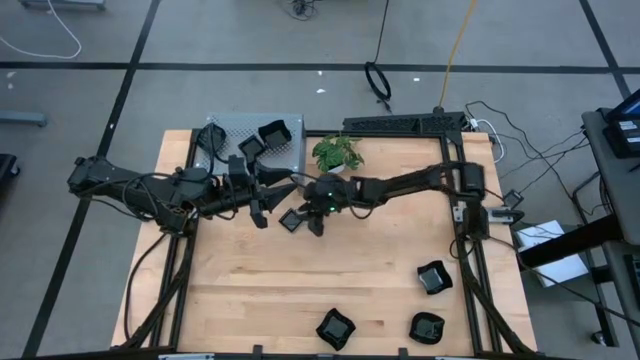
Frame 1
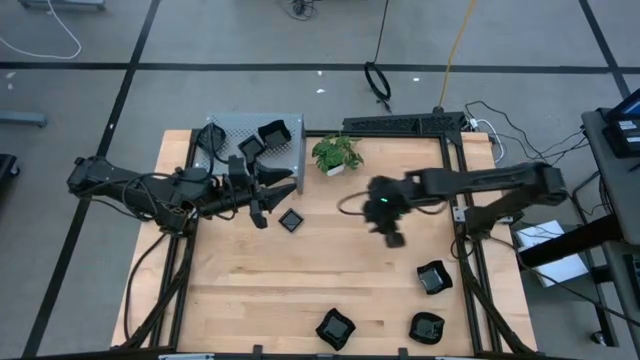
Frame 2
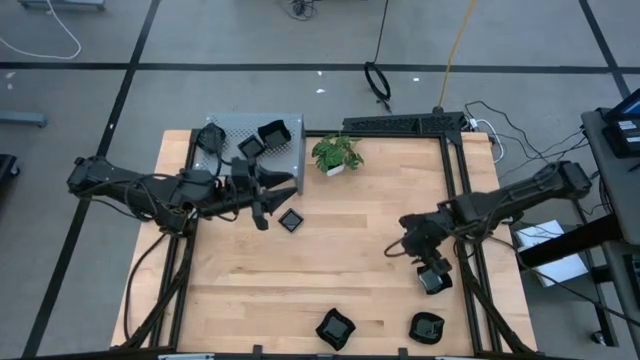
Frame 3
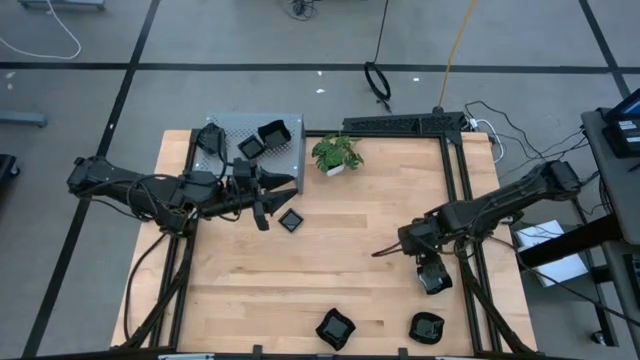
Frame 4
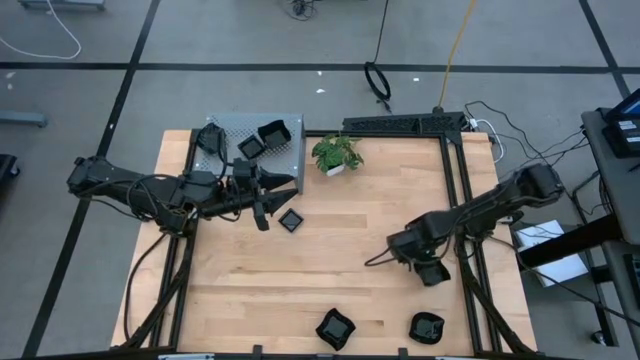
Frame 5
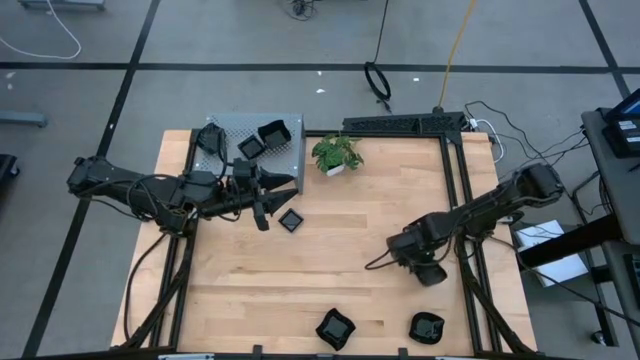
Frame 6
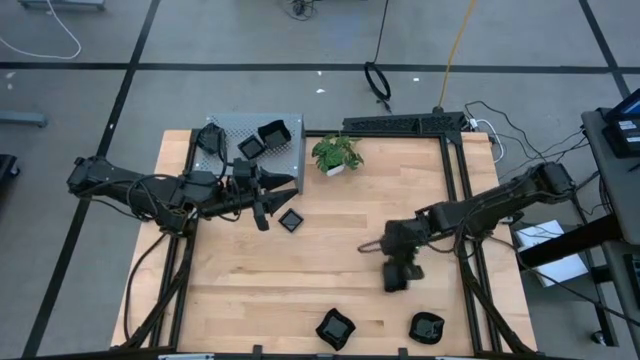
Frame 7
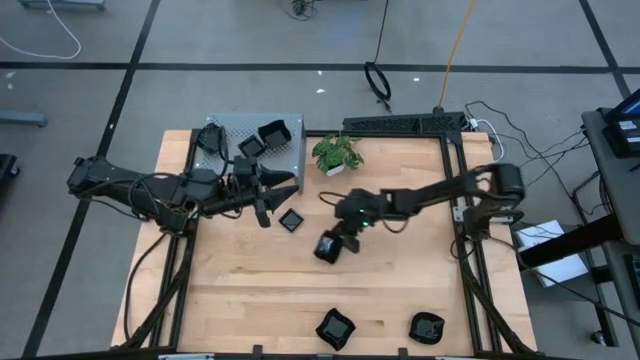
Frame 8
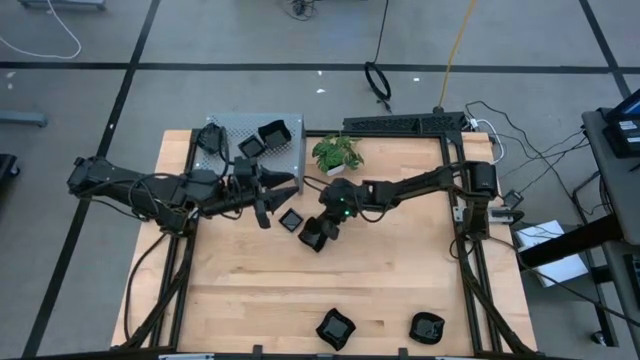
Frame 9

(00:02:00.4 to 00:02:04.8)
Task: Pick & Place Mini shaped plates
Move the black distorted square plate to the center of the table

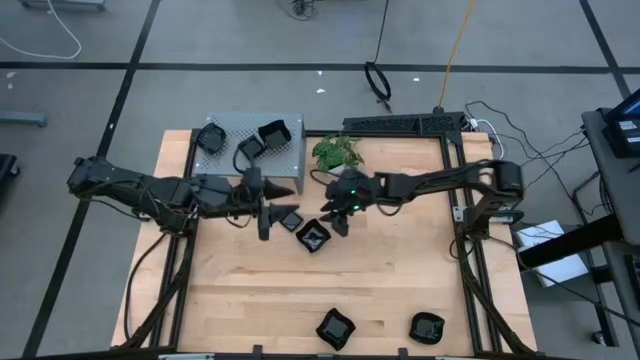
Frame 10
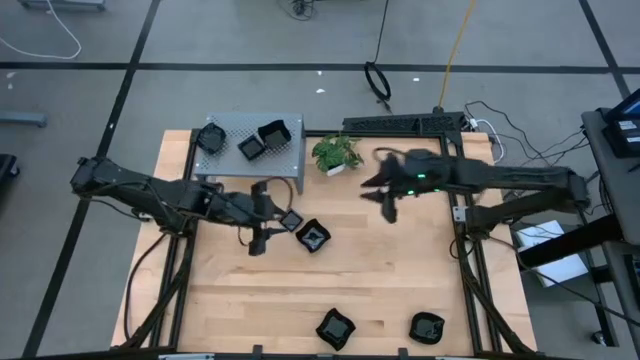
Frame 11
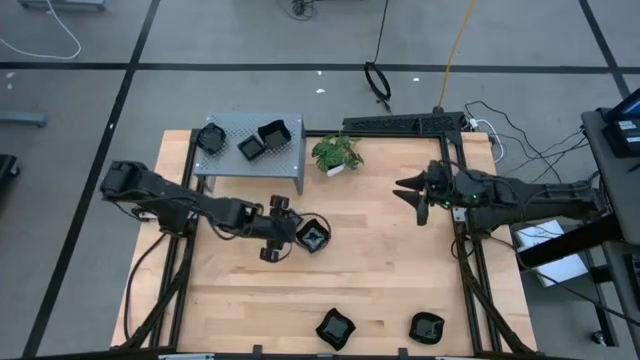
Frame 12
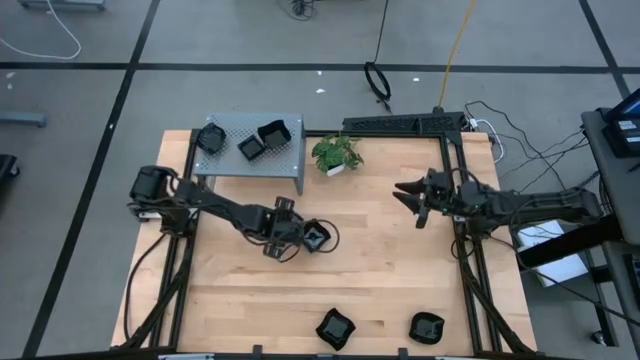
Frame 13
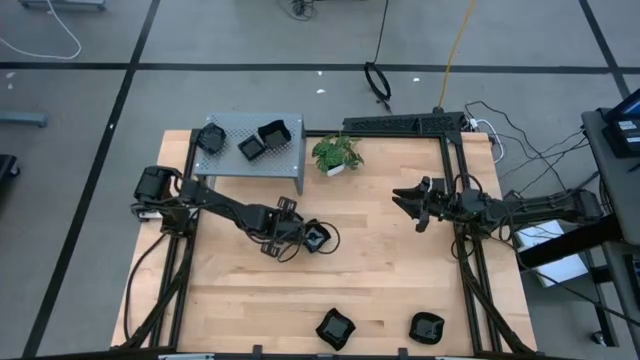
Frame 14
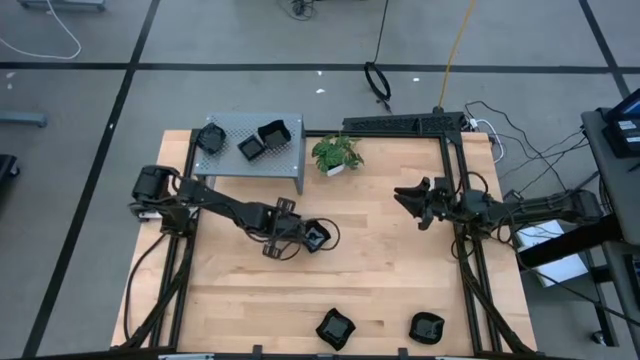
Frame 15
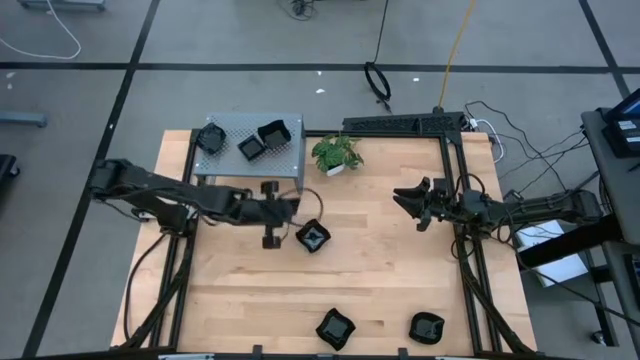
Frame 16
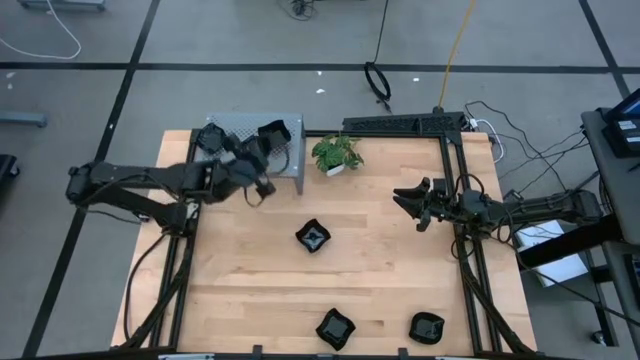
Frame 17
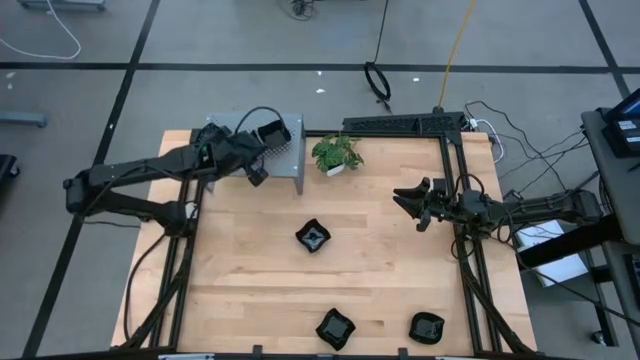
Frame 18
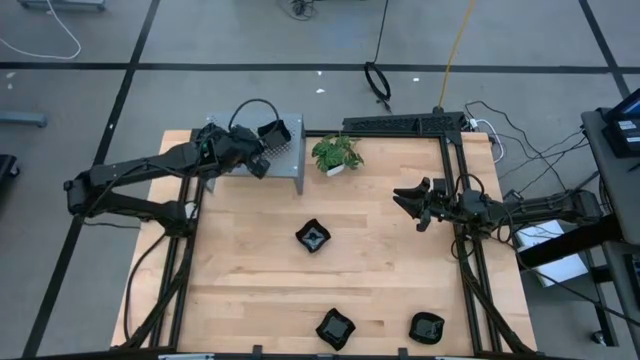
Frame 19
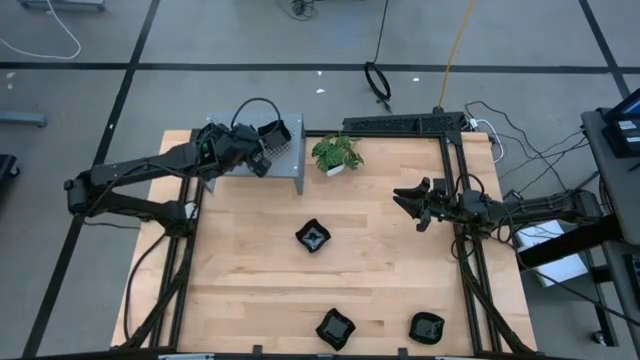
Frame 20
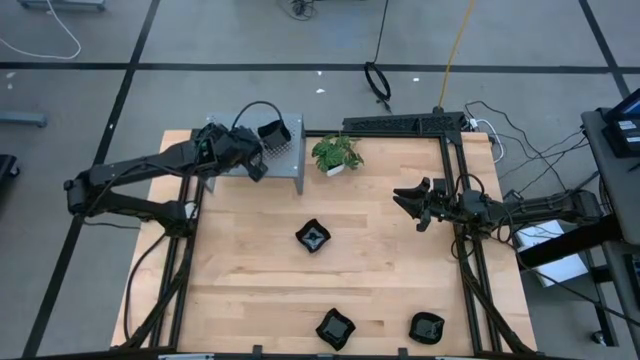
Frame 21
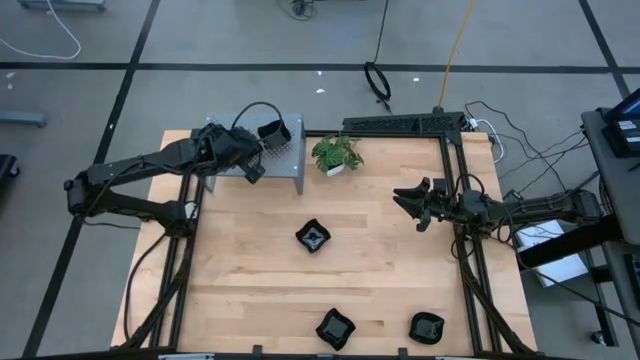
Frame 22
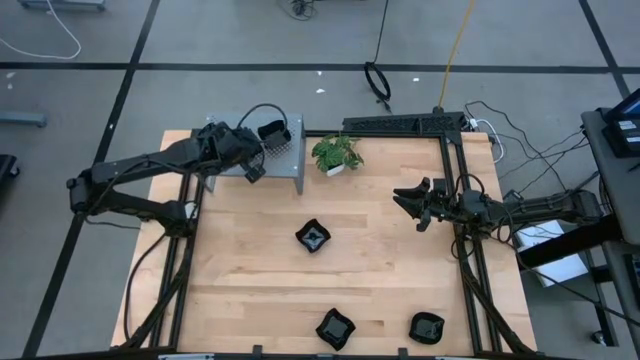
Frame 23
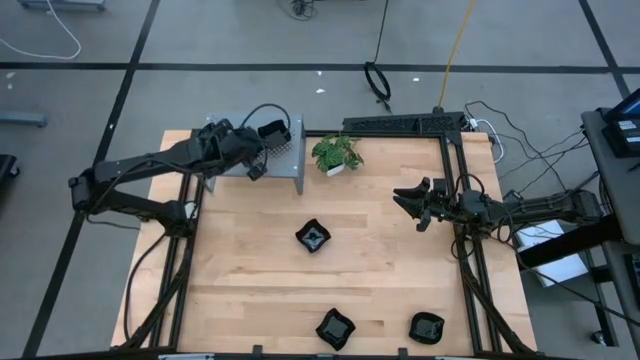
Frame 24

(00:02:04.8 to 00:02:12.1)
Stack the black square plate on top of the other black square plates on the shelf

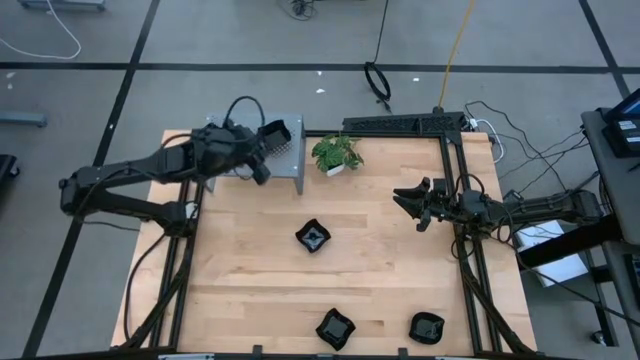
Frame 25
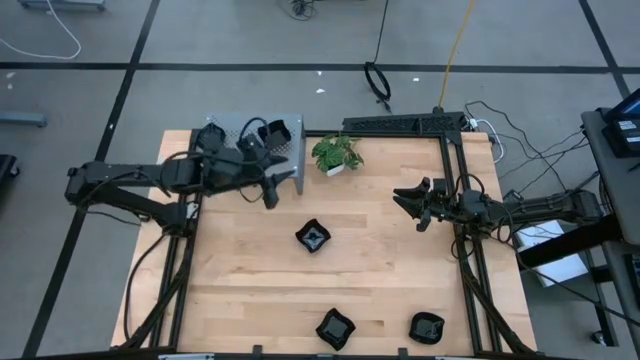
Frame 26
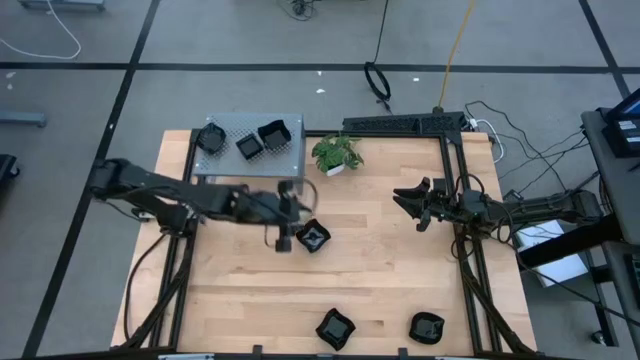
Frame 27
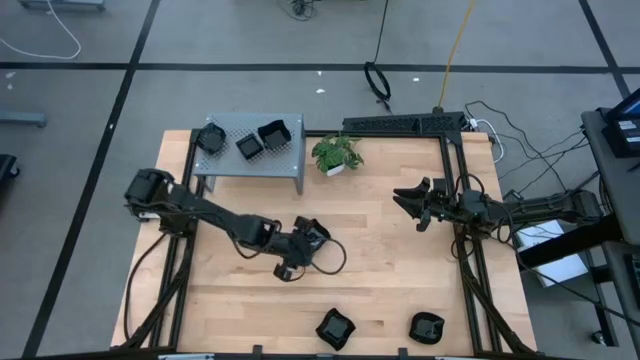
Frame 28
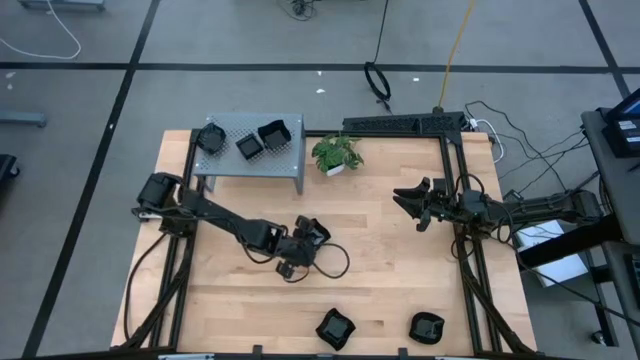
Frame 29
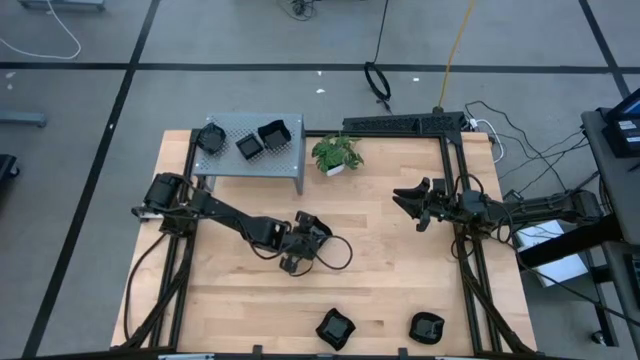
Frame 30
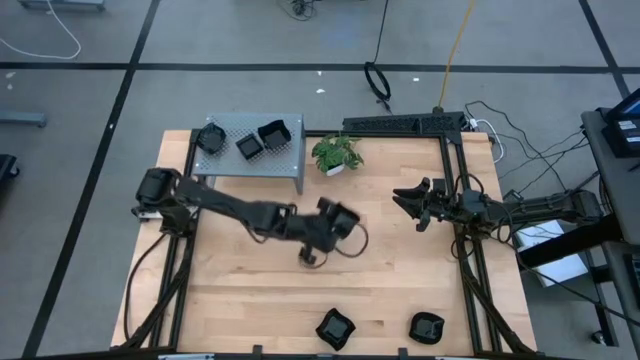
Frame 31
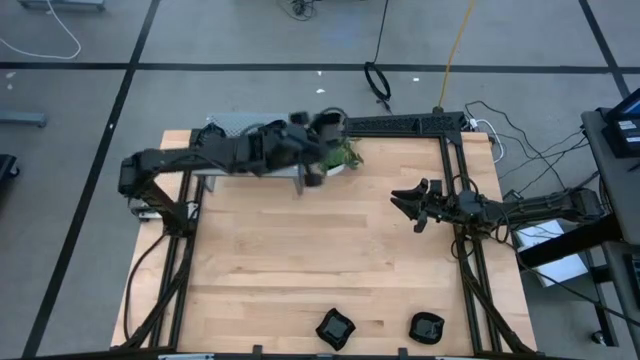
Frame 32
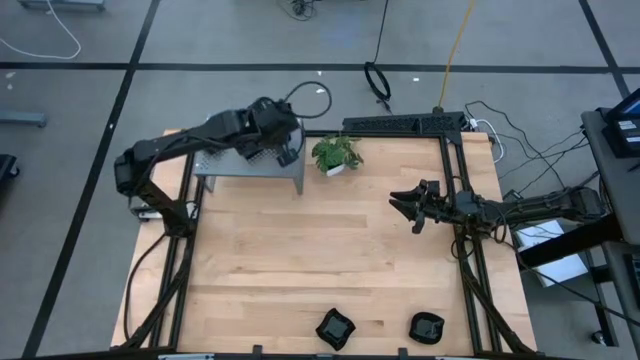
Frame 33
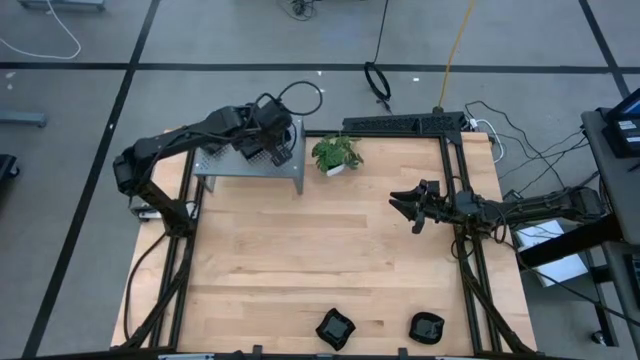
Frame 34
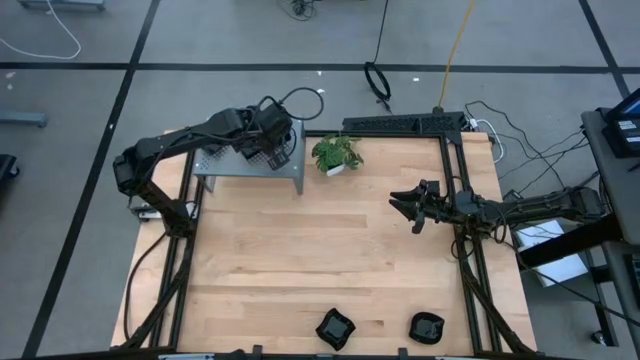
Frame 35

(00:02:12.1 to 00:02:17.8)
Stack the black distorted square plate on top of the other black distorted squares plate on the shelf

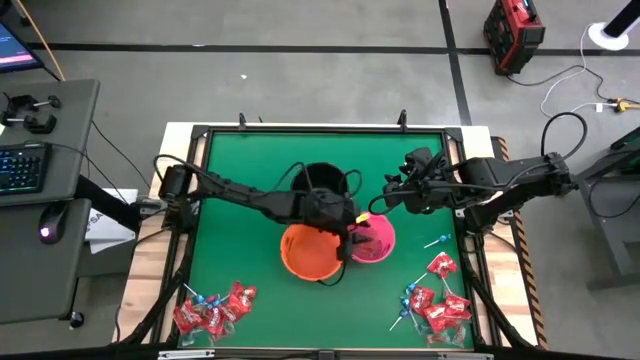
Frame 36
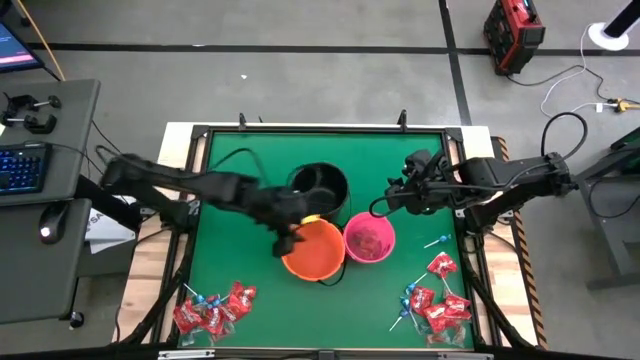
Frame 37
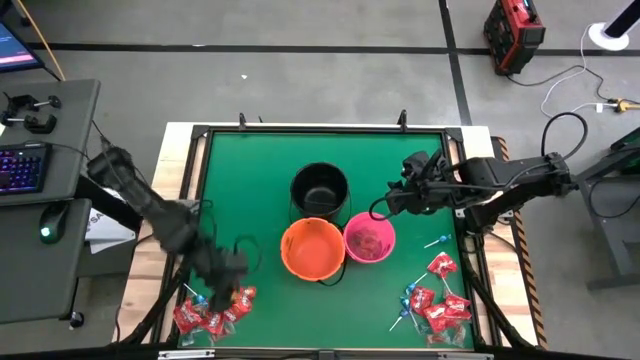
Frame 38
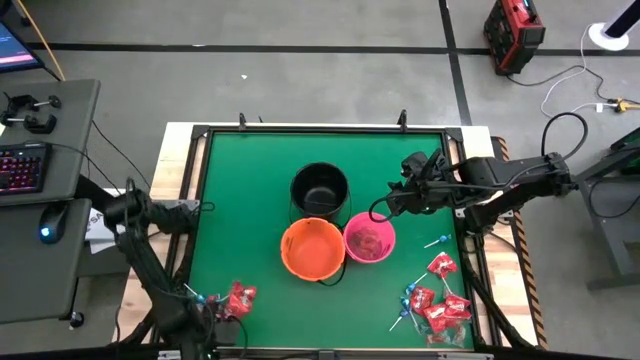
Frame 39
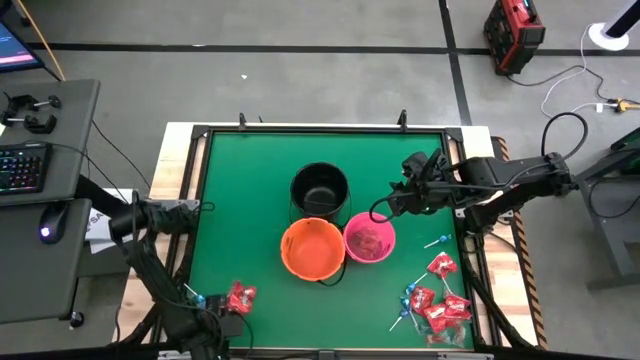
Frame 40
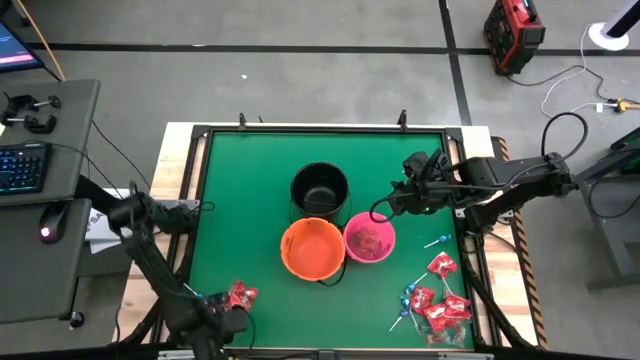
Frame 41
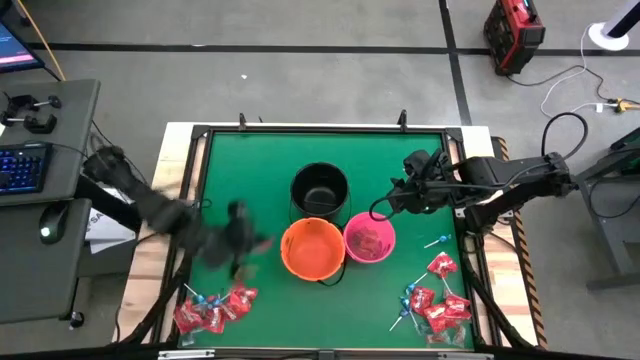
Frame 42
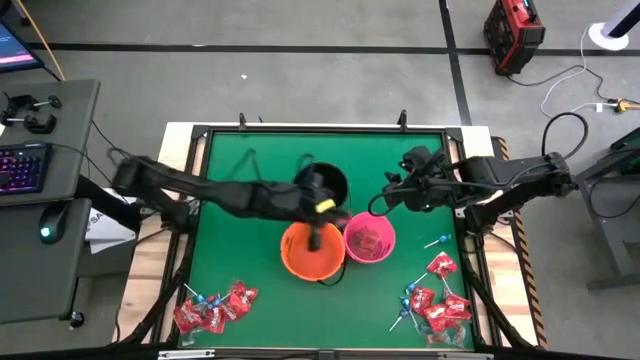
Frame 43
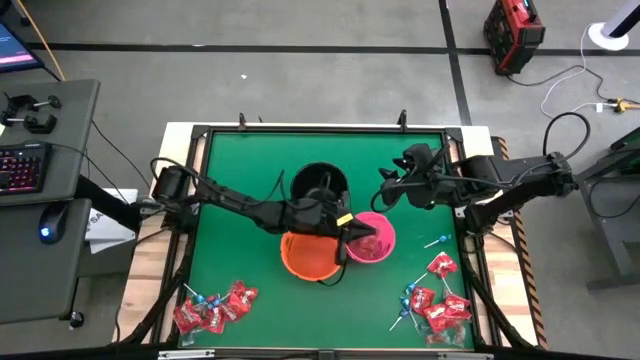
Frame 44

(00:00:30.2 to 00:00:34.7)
Task: Sort candy by brand, put in halloween buckets
Put the red gummy into the pink bucket
